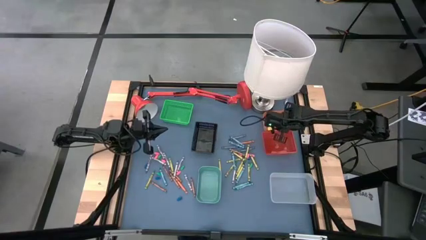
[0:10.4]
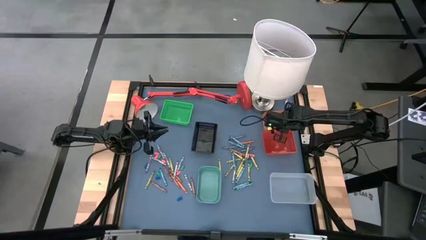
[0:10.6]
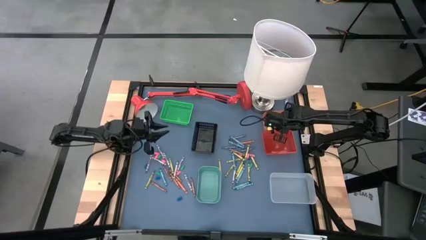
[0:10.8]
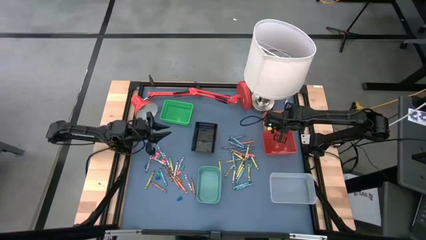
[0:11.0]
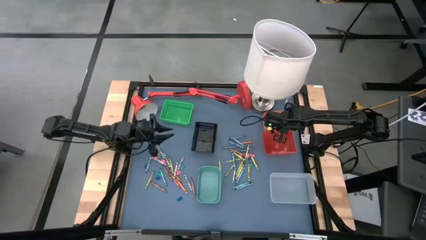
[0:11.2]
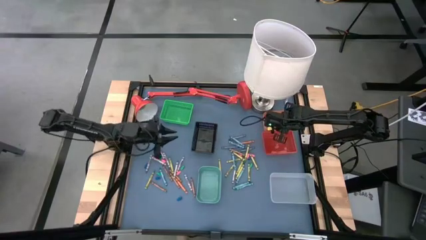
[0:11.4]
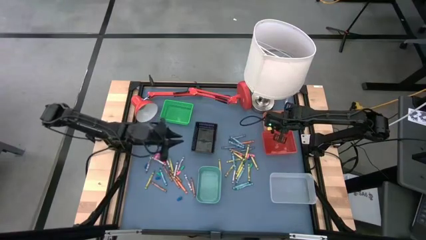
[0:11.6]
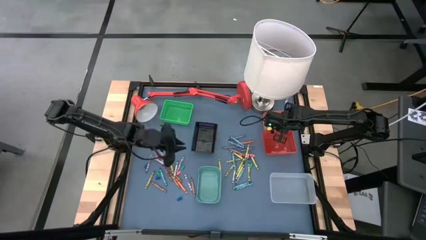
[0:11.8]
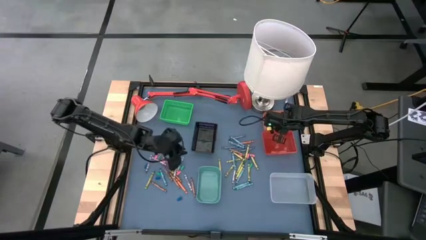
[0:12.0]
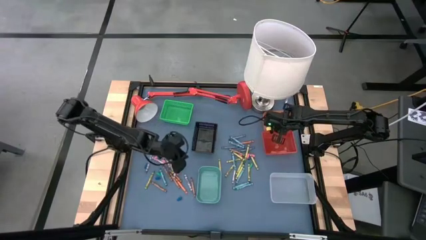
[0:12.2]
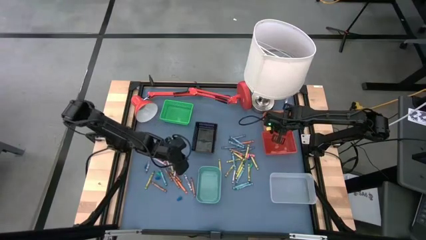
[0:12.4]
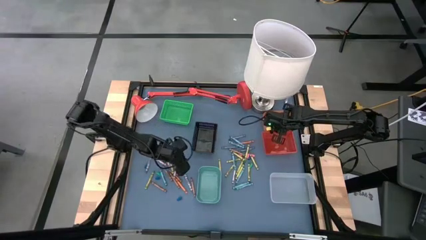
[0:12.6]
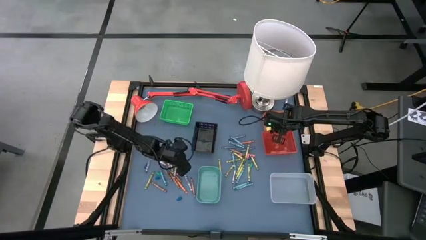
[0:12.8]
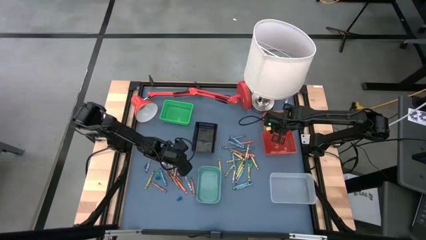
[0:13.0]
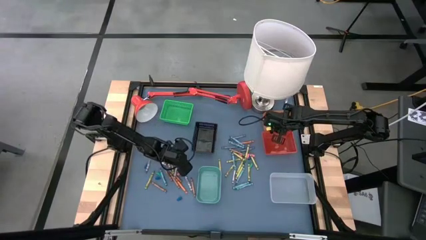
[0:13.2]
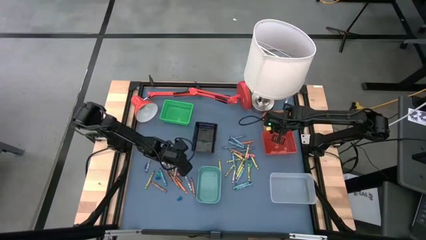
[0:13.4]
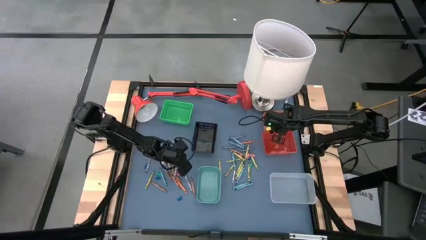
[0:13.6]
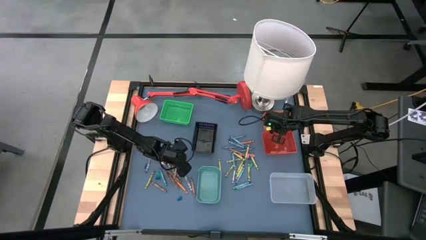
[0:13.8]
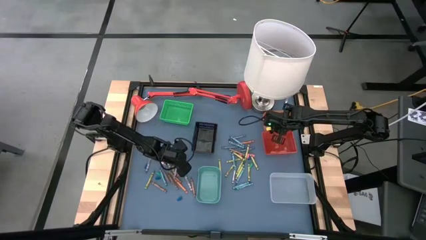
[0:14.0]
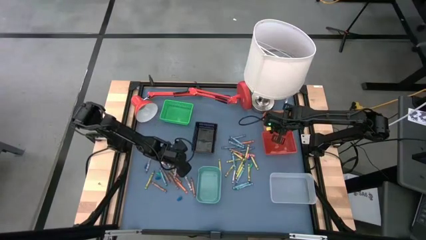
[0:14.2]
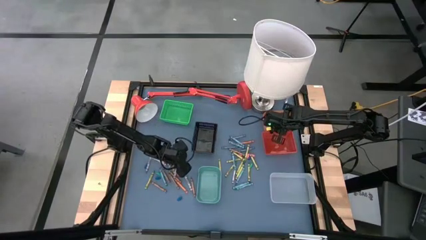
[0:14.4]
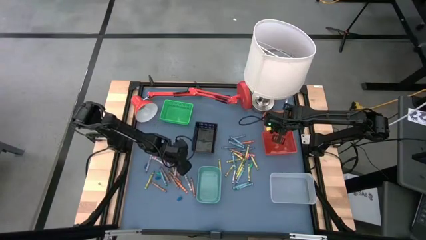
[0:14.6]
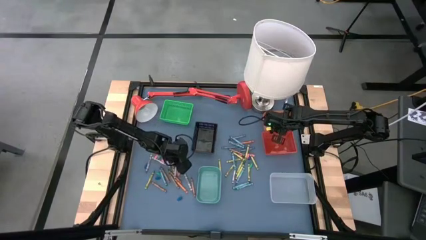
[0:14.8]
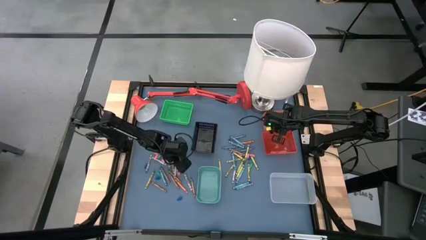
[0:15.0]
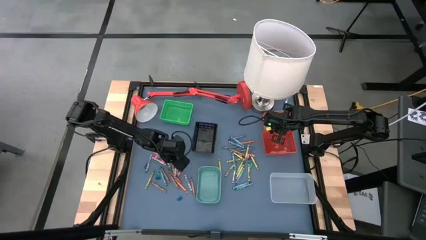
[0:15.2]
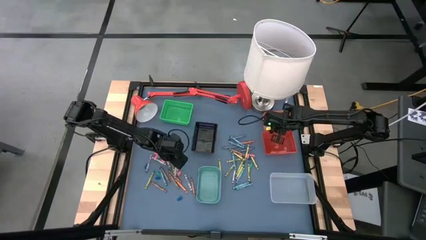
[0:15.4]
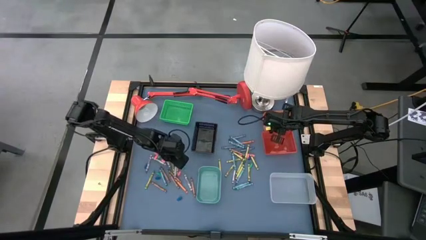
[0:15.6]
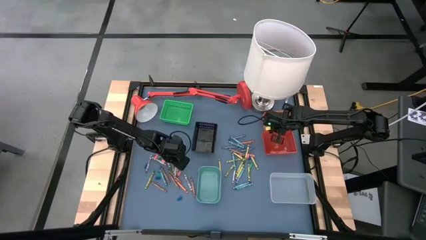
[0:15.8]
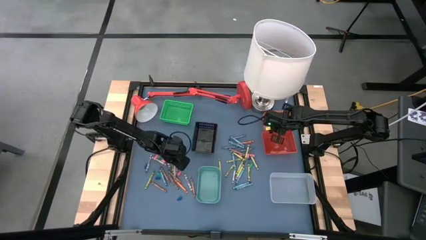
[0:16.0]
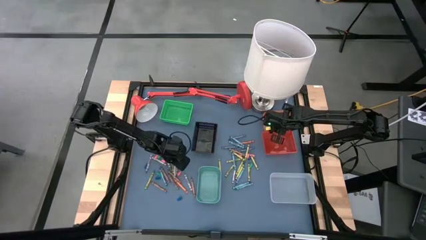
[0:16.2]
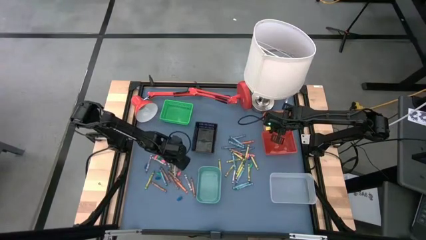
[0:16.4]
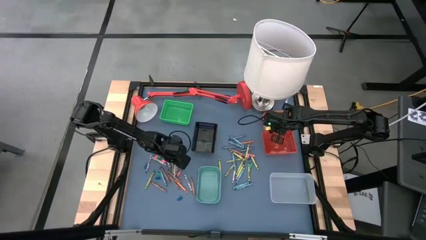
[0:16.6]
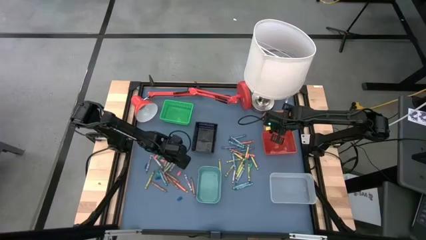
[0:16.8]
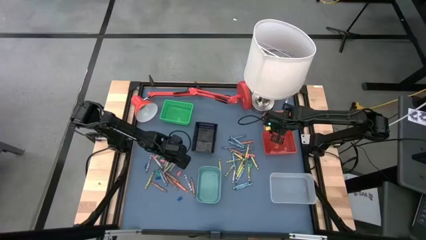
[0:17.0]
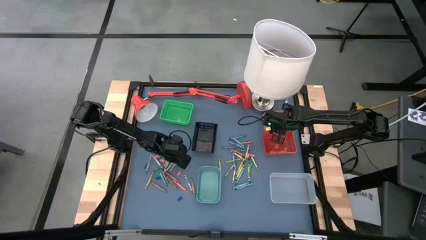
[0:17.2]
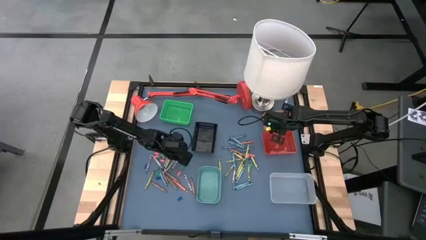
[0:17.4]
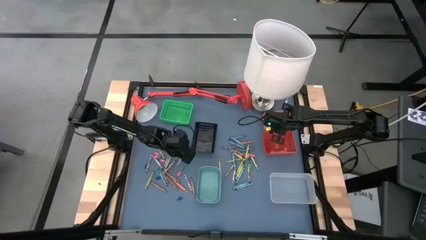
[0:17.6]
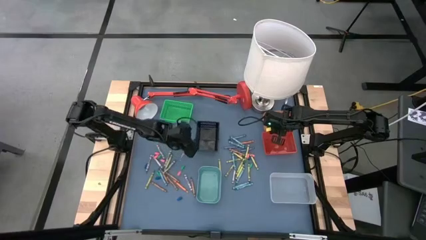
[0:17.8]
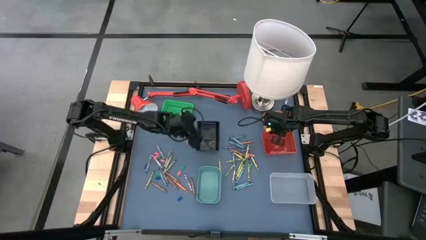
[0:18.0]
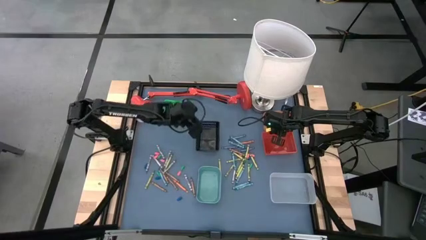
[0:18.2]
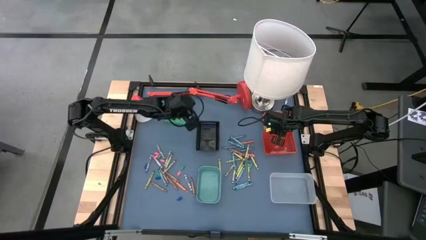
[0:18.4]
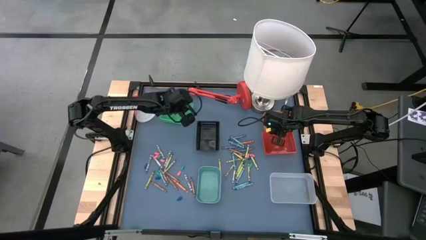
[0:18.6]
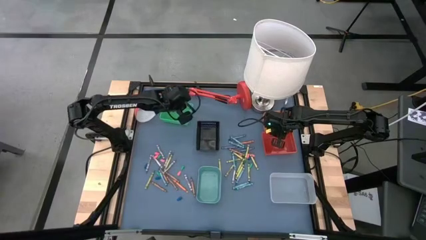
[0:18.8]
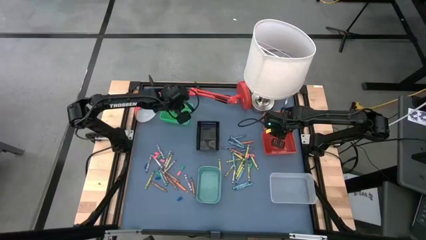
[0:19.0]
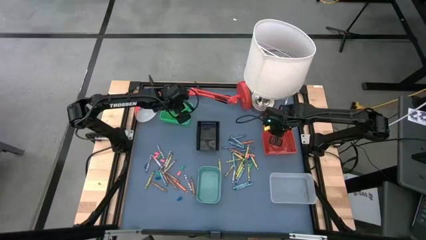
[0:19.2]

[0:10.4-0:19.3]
Task: Sort crayons
Put the gray crayon into the green bin

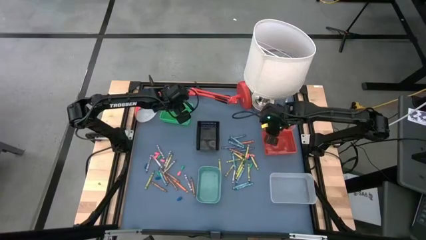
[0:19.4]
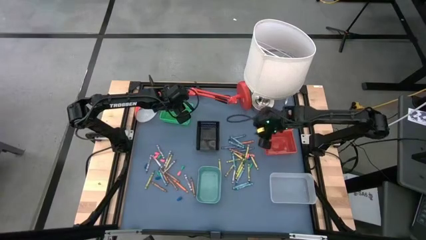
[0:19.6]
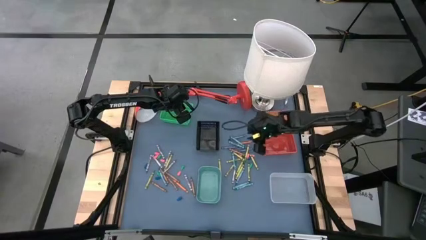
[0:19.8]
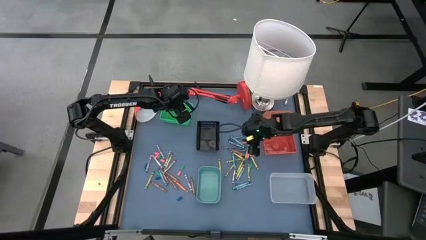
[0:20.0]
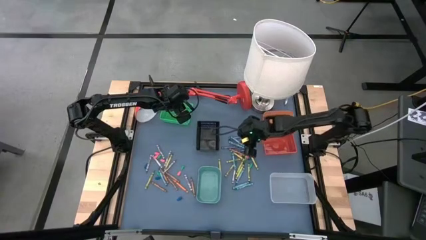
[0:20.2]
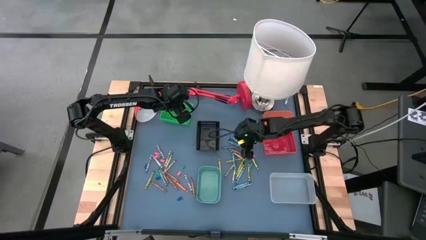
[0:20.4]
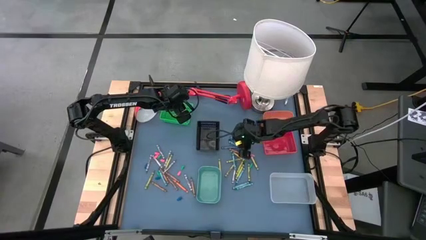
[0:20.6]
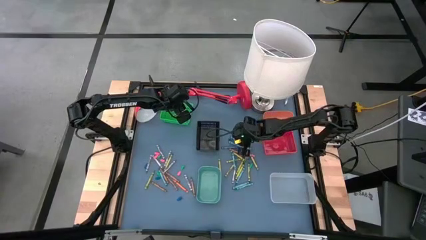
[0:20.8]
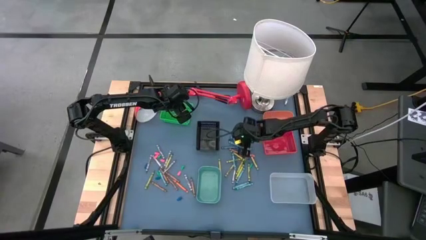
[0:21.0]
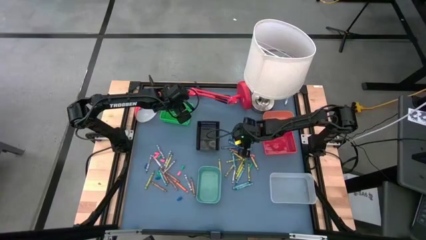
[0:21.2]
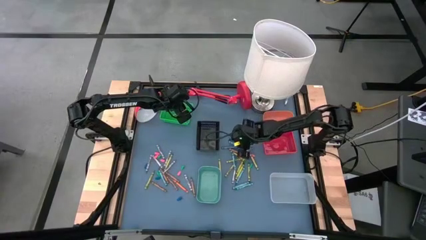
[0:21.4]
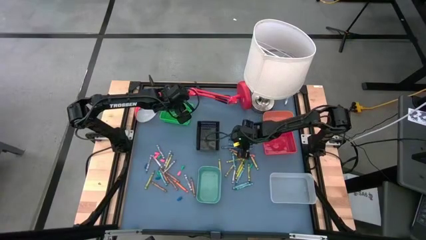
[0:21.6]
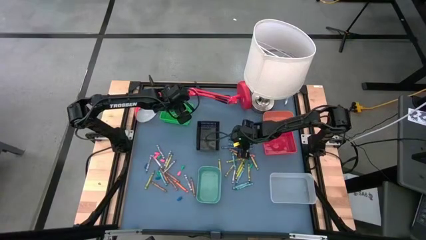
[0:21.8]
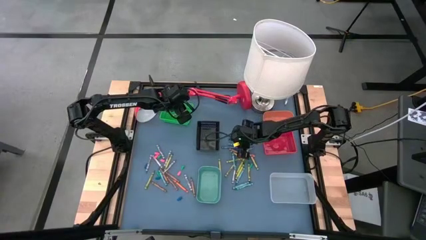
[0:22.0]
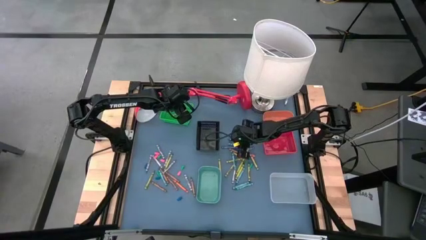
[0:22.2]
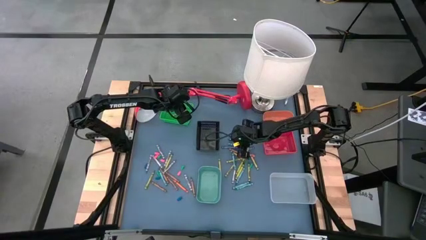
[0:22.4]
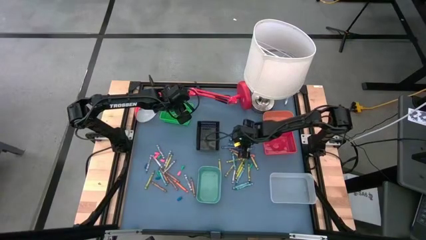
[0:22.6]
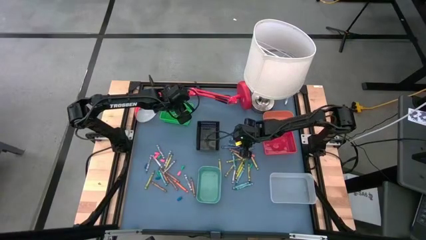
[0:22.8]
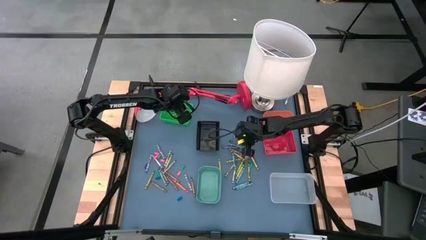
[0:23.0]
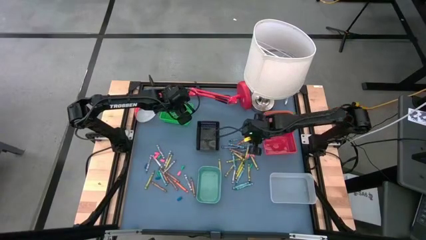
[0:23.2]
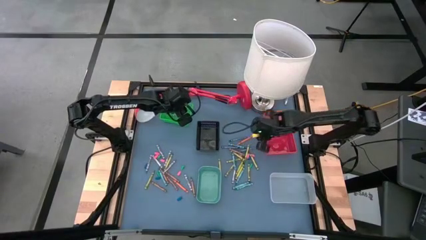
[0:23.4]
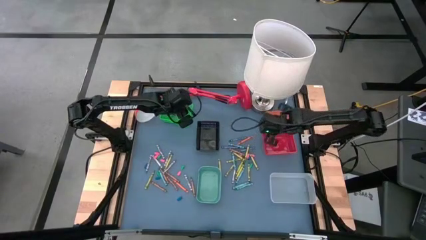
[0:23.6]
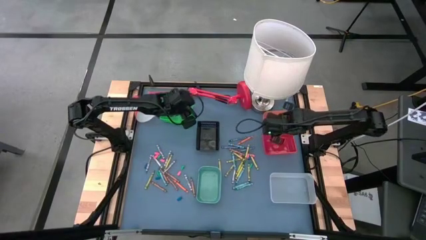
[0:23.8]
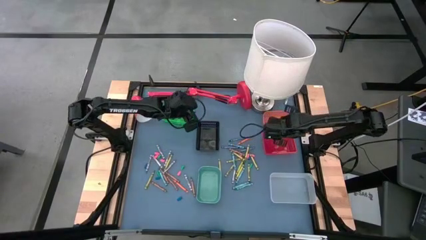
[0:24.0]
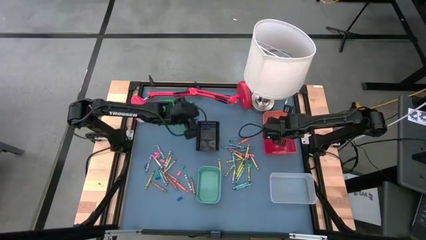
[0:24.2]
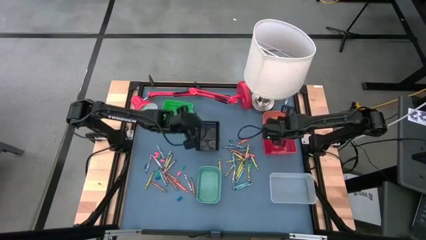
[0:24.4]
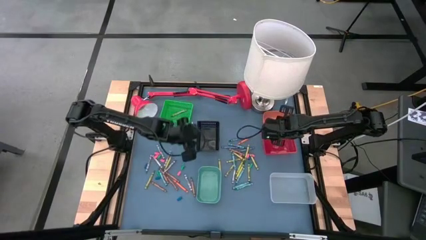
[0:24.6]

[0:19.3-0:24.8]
Put the blue green crayon into the orange bin
